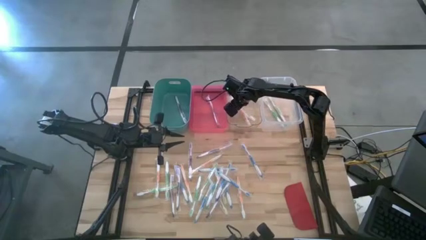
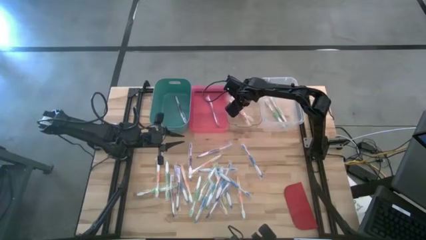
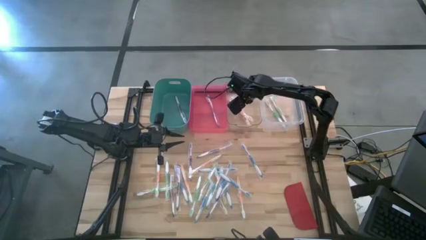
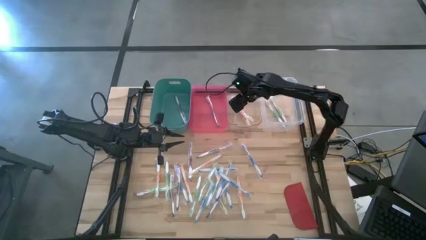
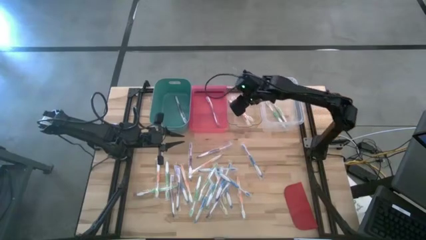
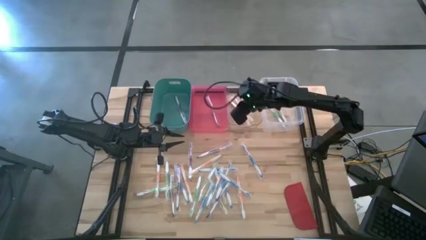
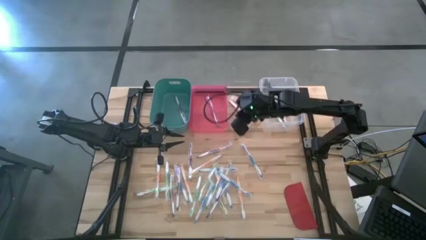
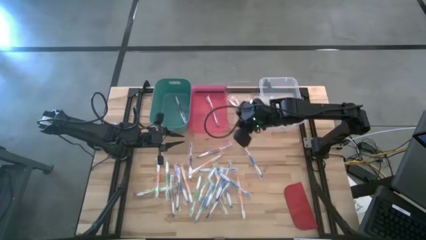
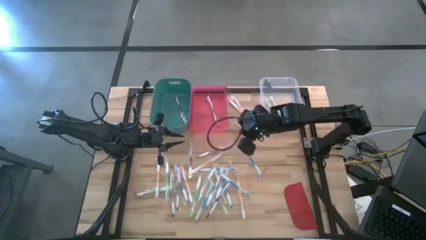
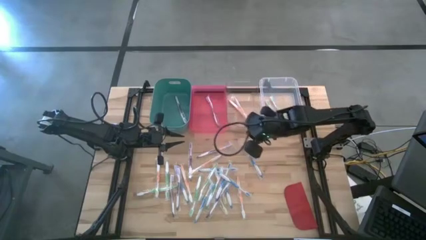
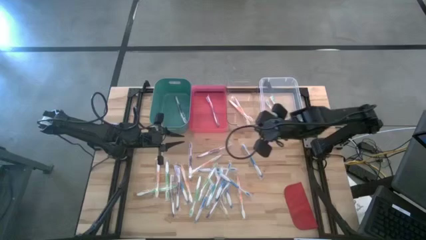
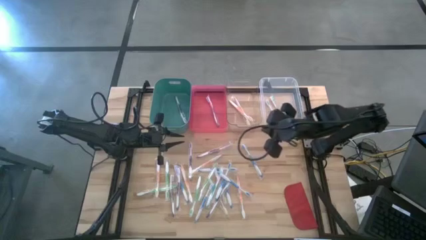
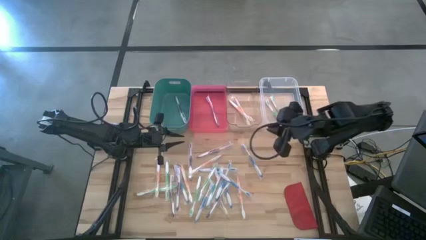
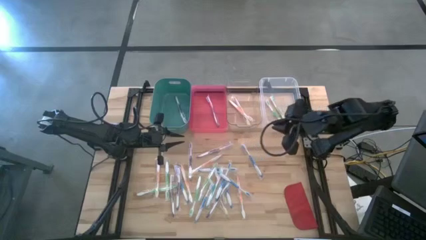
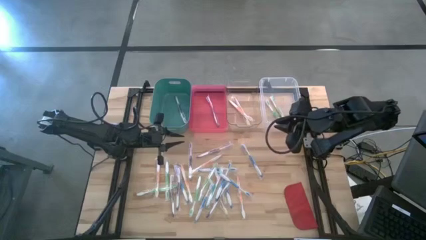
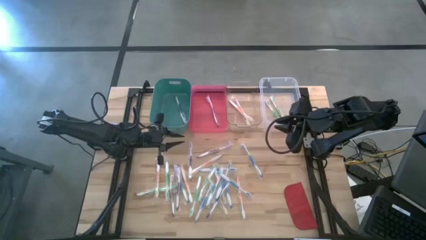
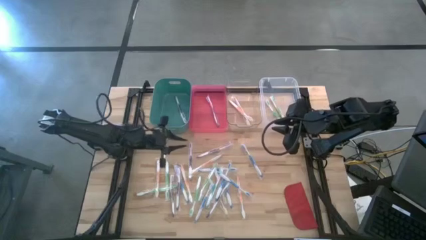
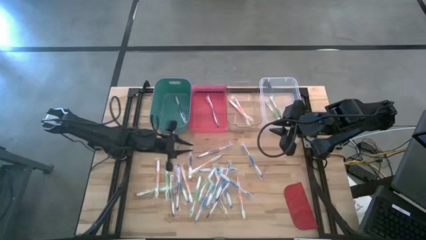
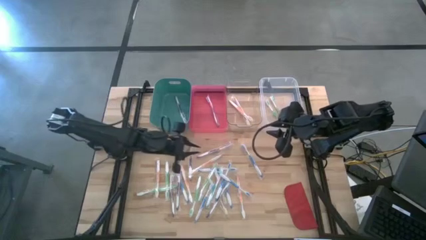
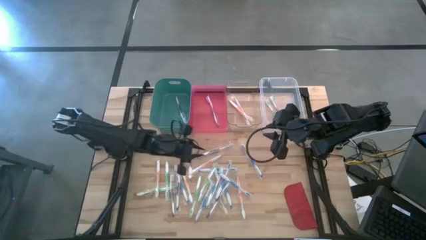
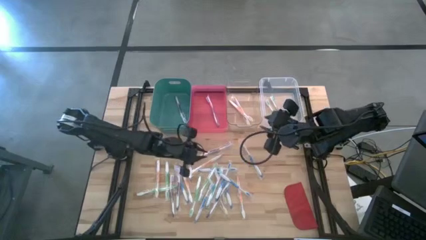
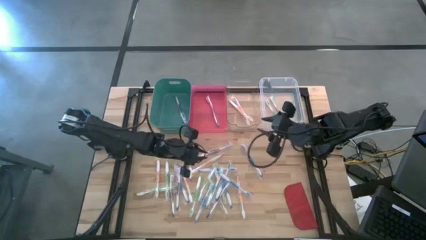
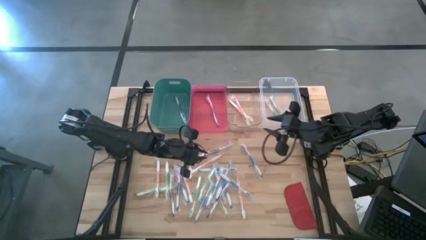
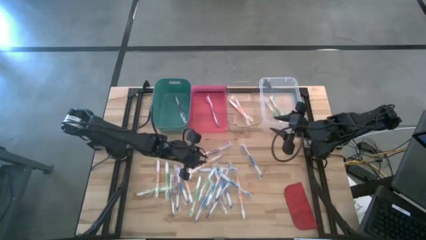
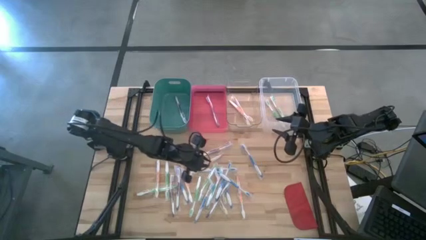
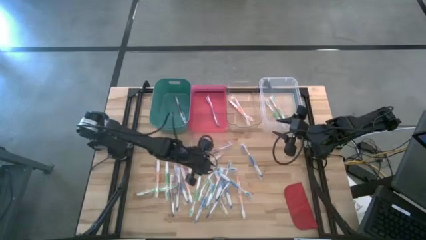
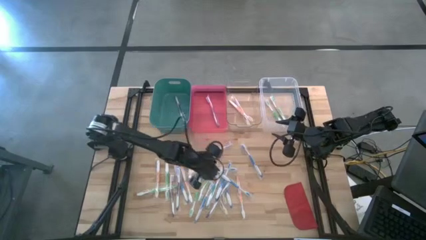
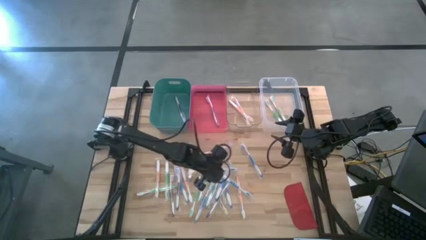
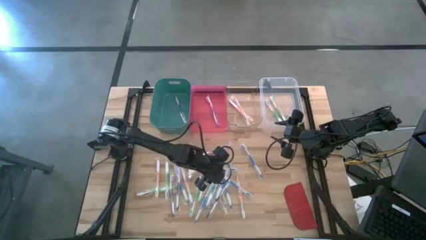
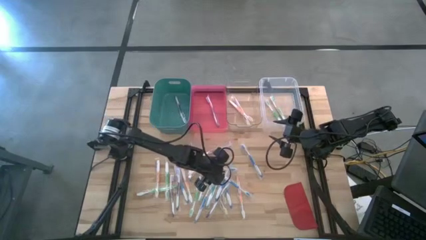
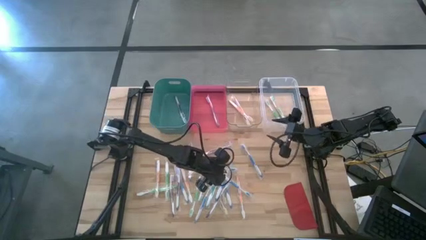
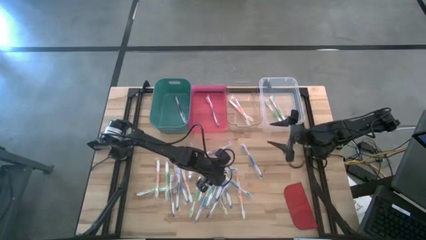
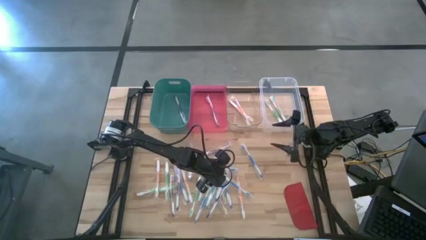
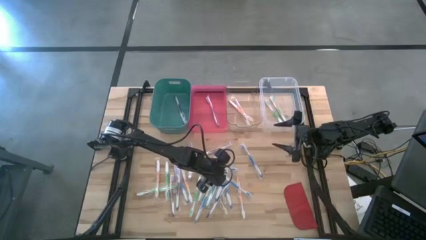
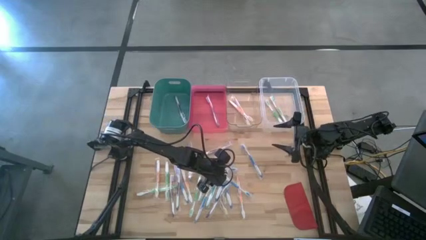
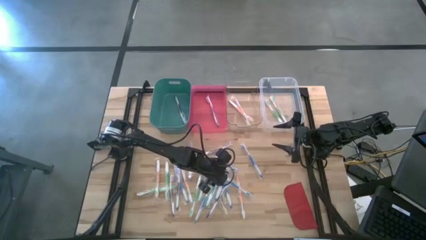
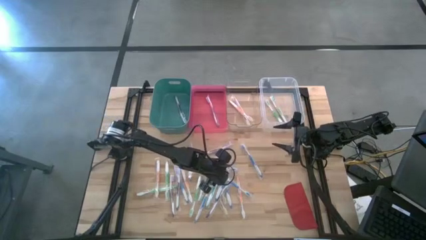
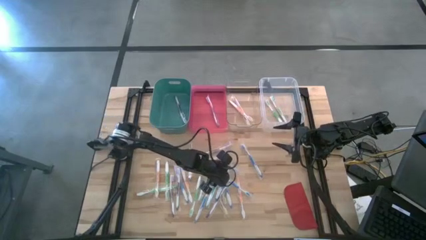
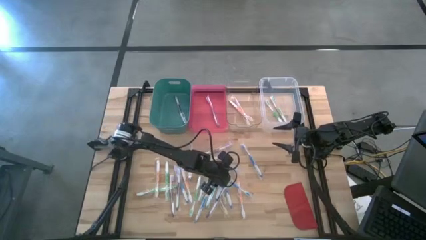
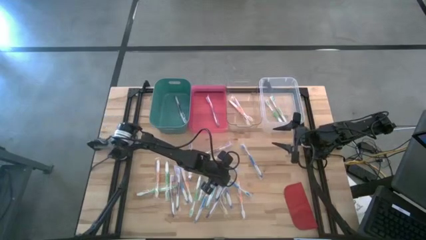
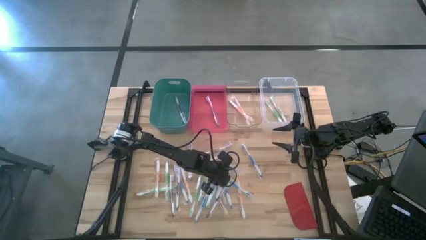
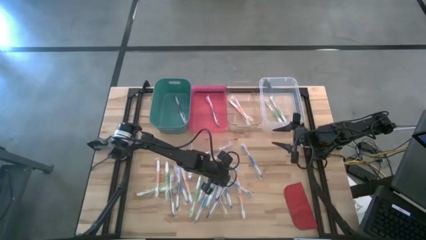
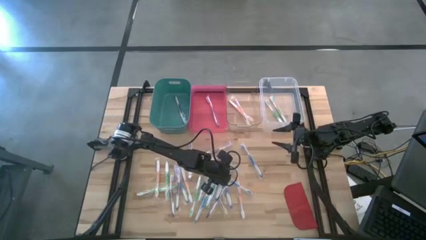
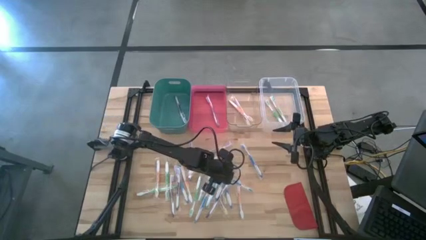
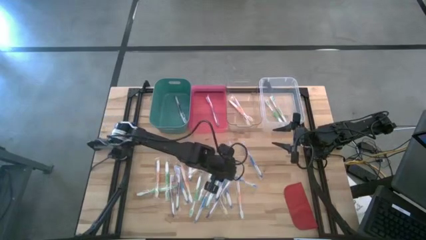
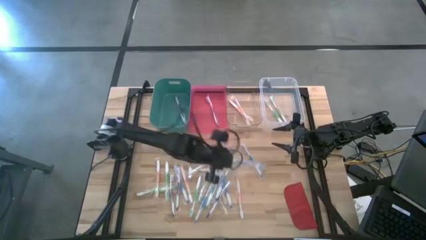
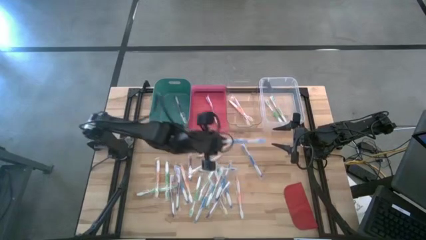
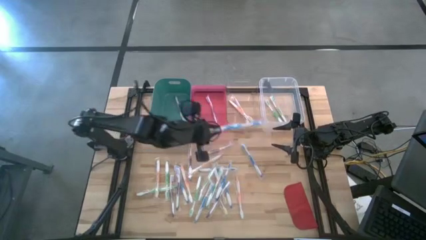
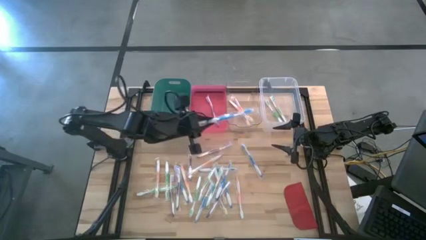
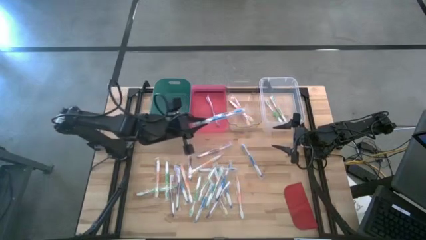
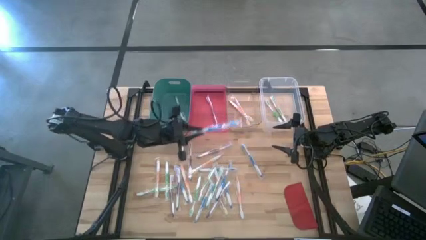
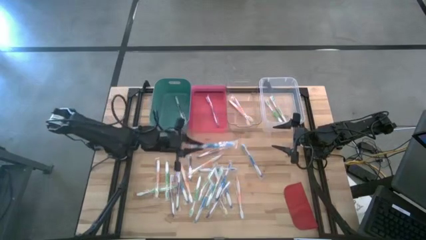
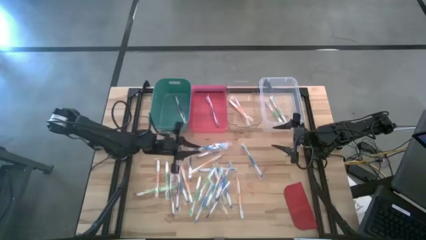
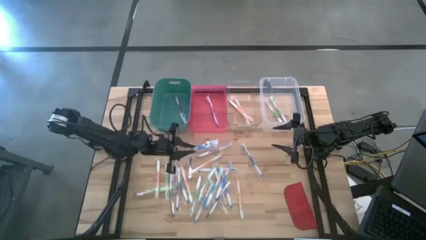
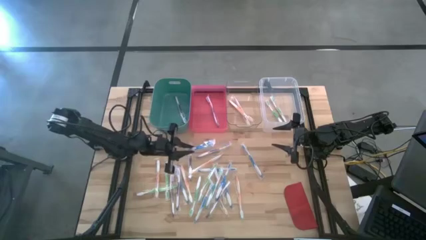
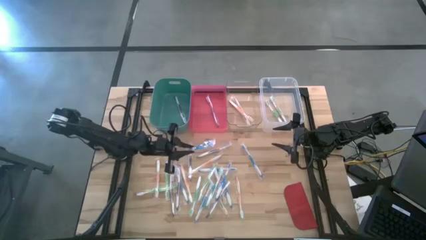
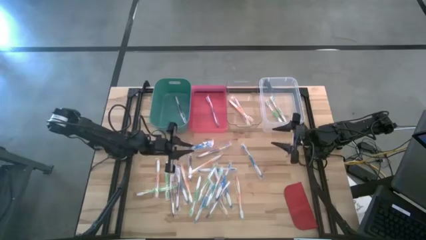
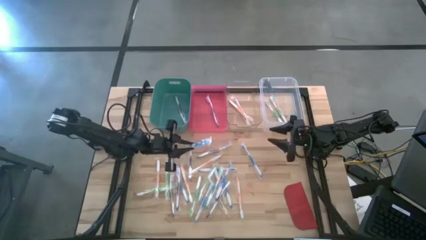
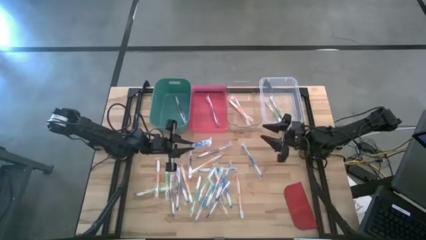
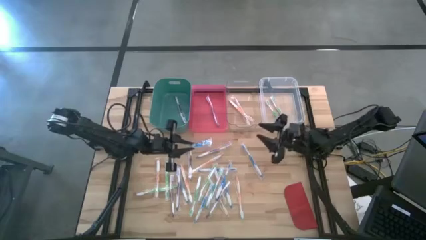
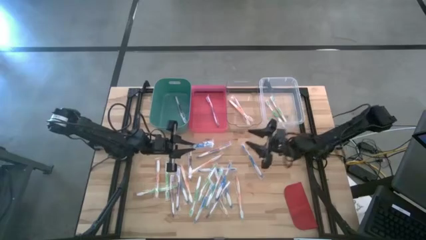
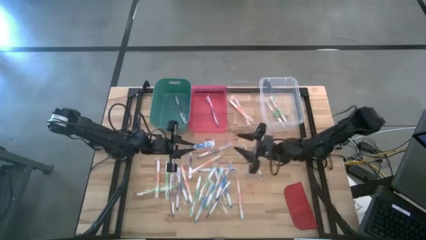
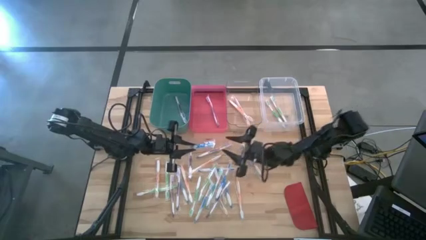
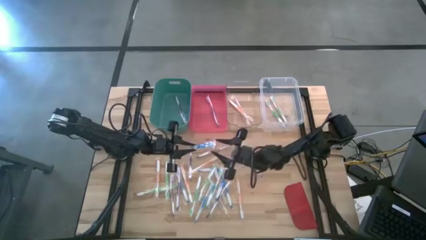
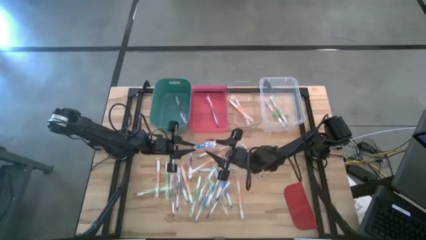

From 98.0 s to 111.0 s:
Task: Pick & Place Toothbrushes
Put the blue toothbrush into the red bin

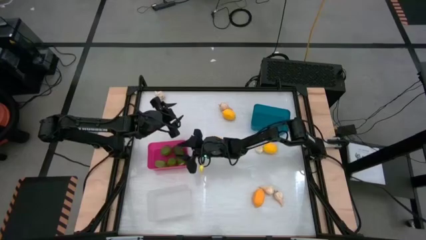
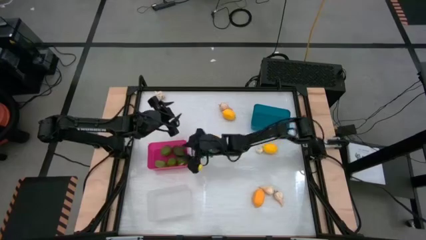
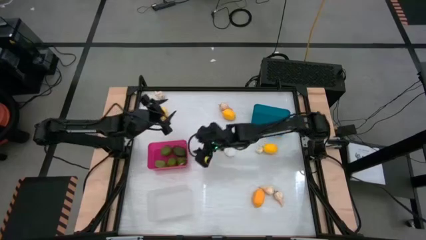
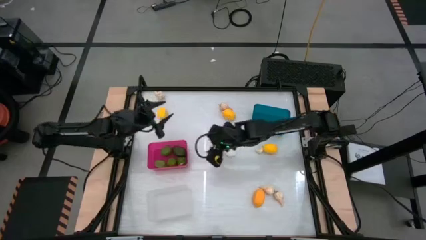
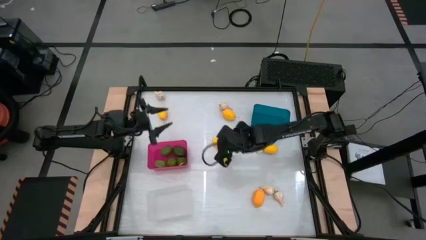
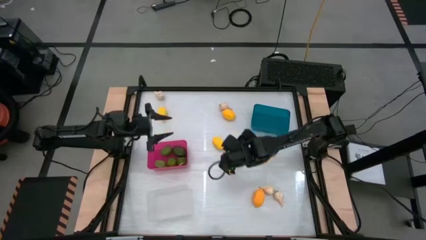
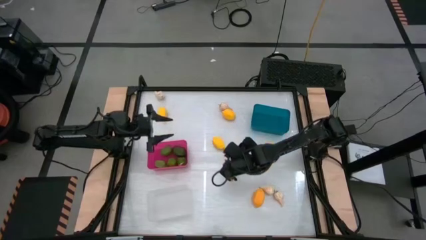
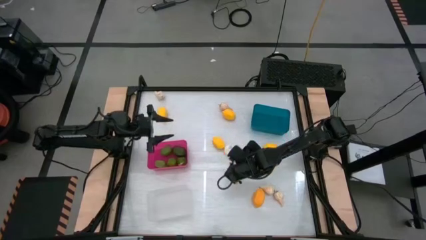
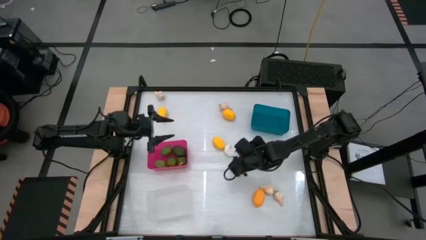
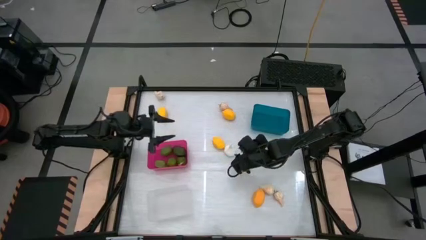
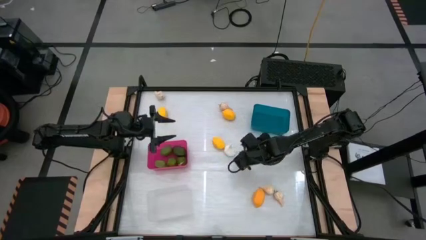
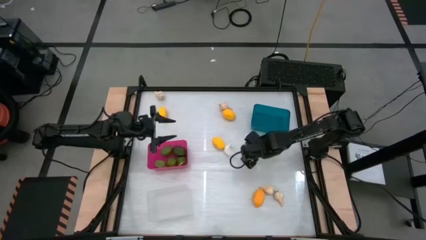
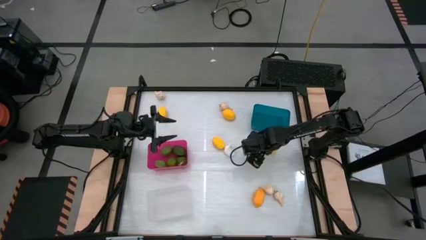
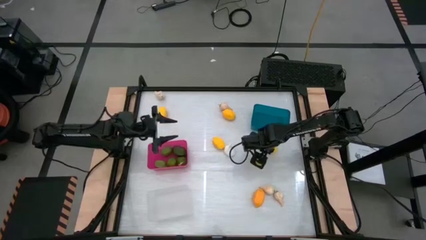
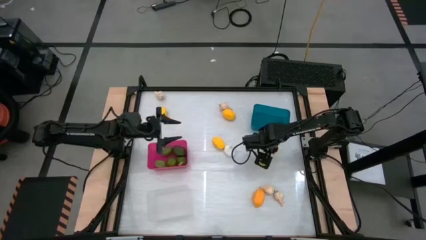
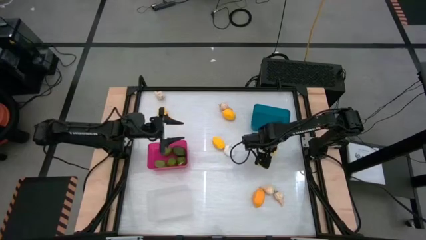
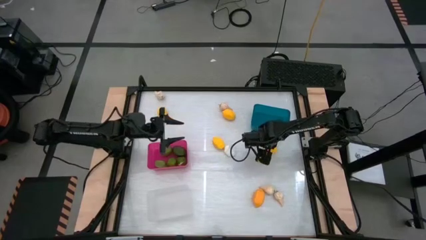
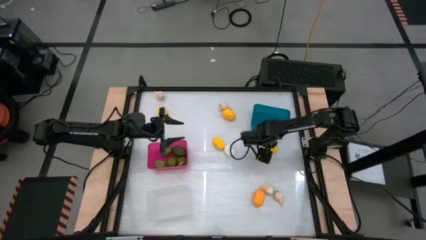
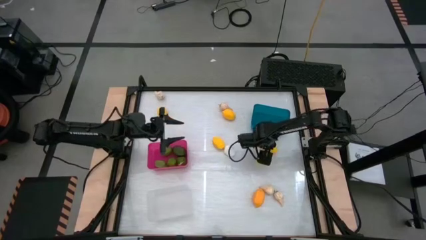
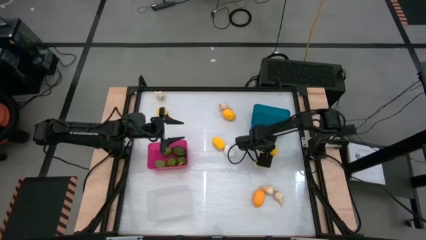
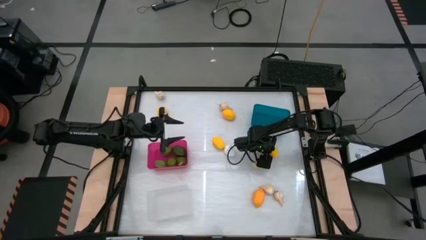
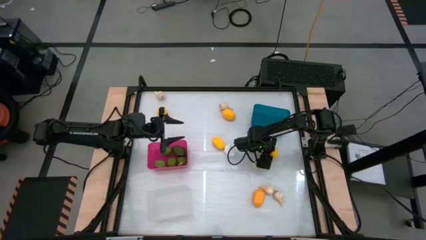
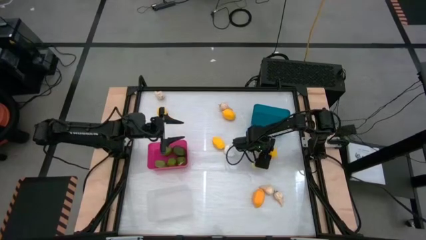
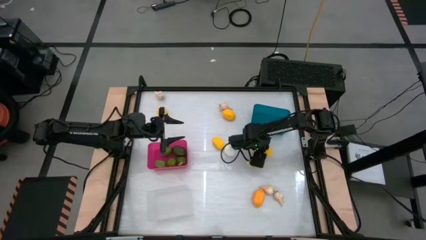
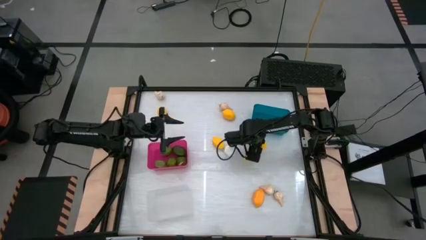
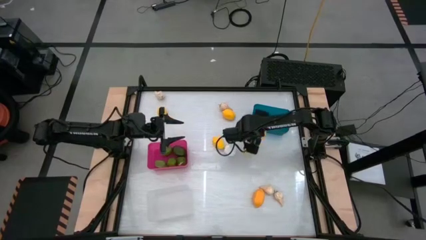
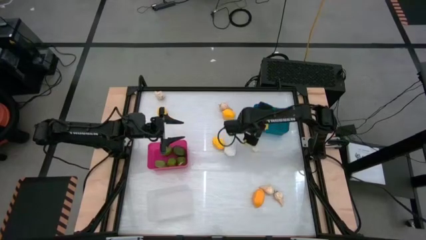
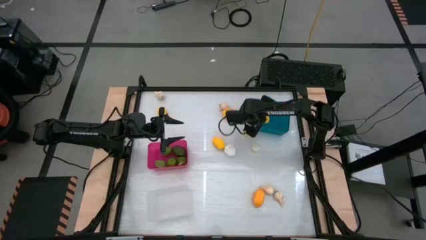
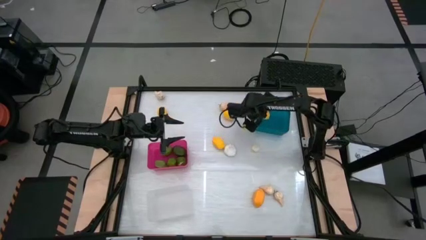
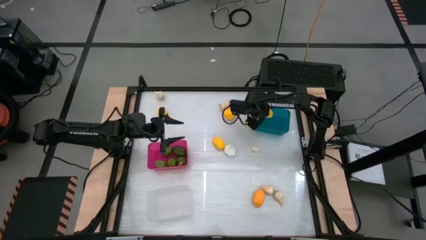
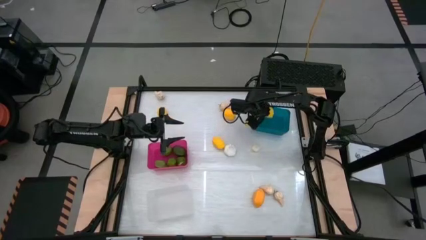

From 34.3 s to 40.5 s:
Task: Sort produce into baskets
Put the lemon into the blue bin
